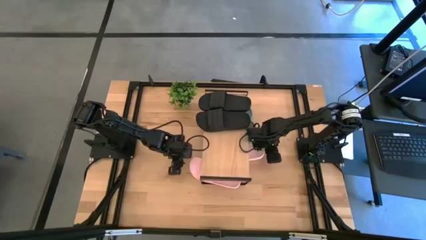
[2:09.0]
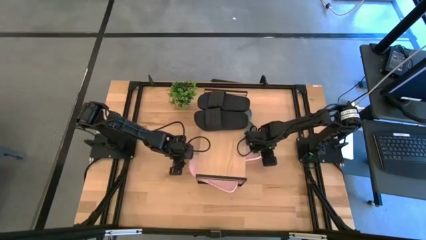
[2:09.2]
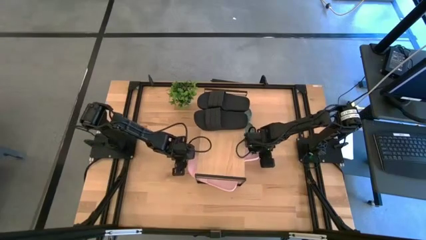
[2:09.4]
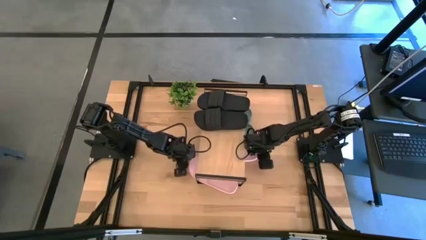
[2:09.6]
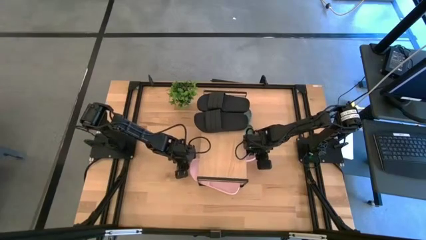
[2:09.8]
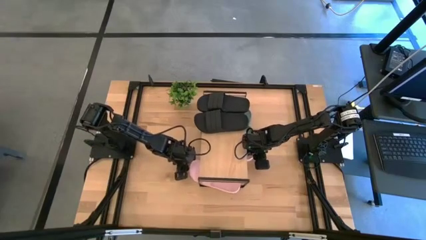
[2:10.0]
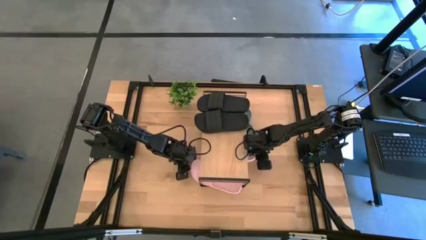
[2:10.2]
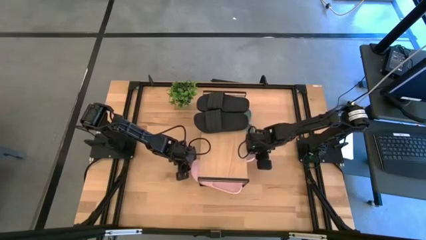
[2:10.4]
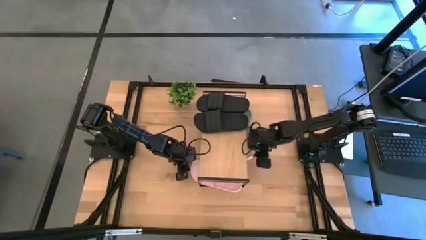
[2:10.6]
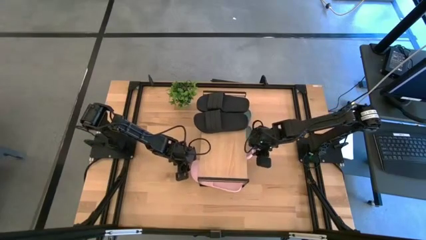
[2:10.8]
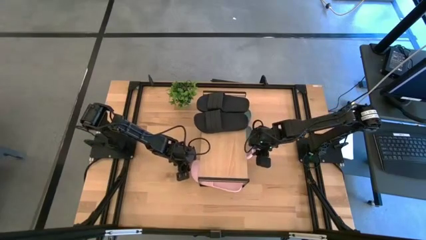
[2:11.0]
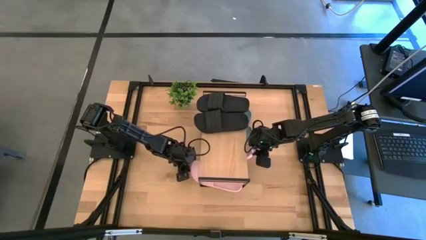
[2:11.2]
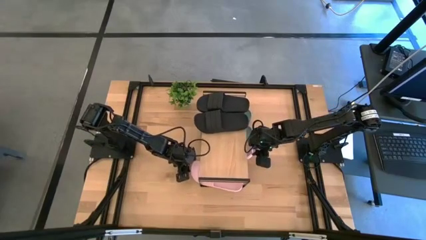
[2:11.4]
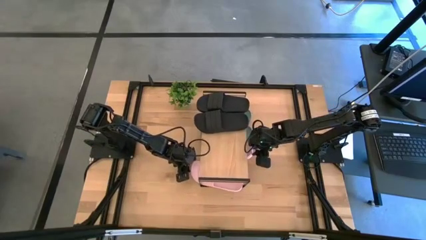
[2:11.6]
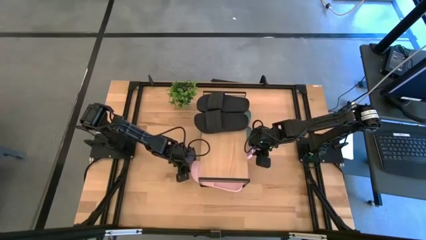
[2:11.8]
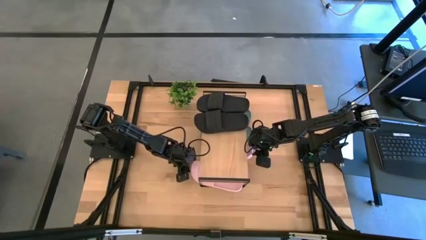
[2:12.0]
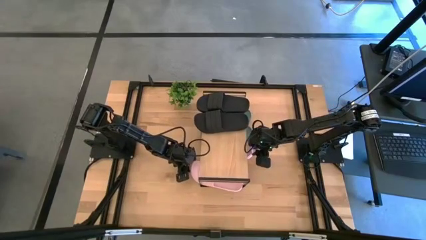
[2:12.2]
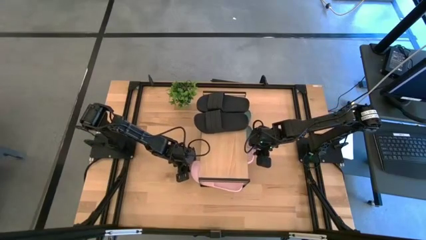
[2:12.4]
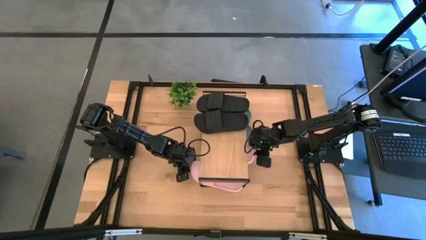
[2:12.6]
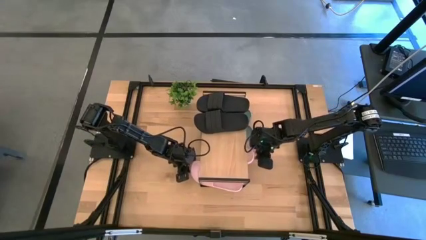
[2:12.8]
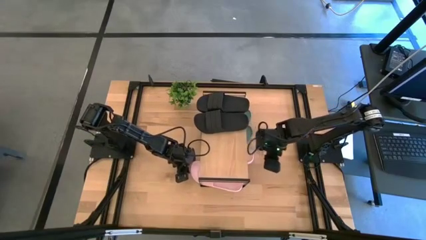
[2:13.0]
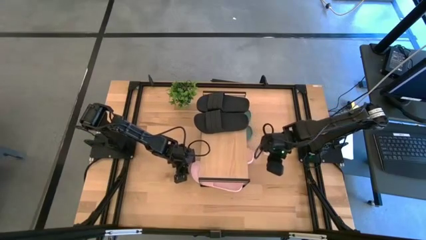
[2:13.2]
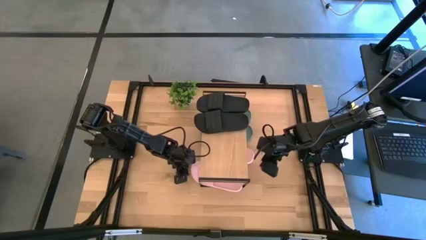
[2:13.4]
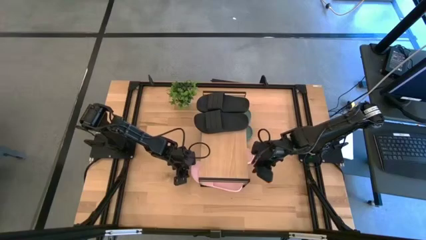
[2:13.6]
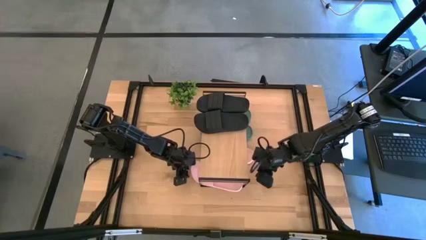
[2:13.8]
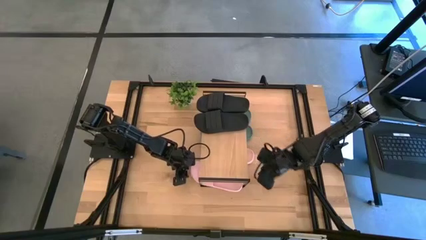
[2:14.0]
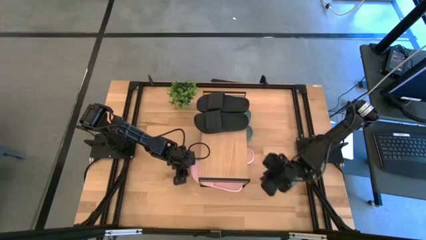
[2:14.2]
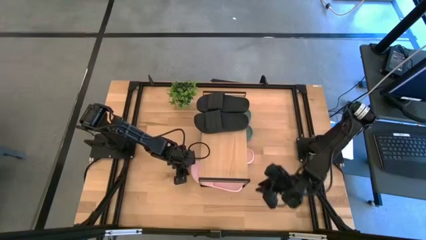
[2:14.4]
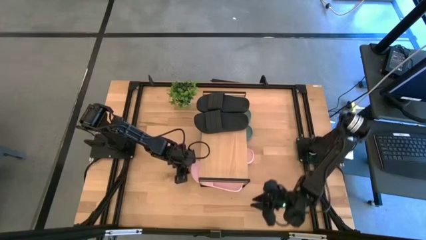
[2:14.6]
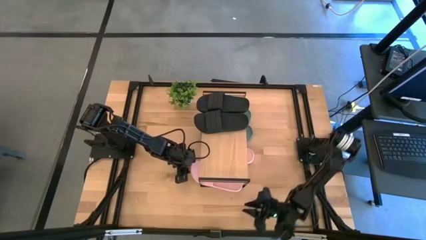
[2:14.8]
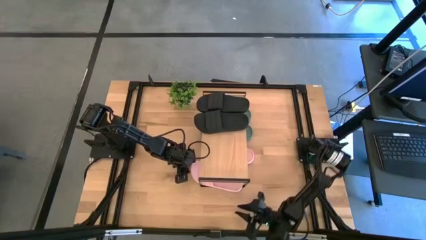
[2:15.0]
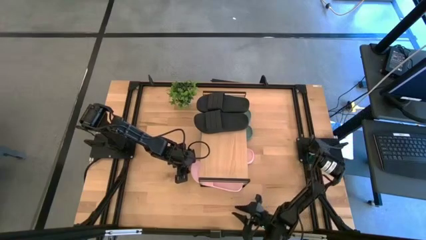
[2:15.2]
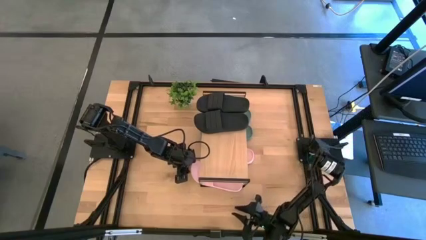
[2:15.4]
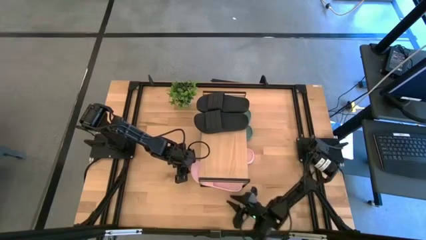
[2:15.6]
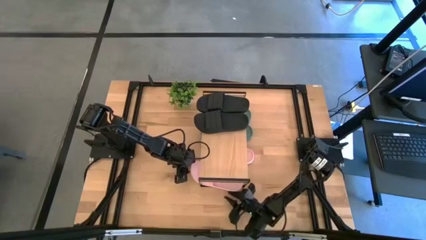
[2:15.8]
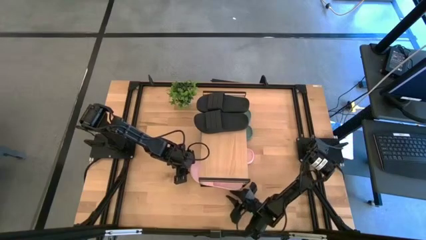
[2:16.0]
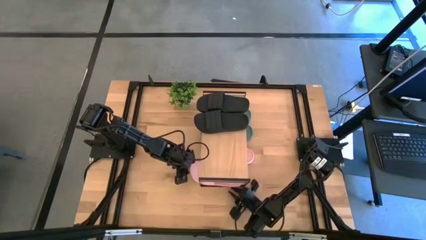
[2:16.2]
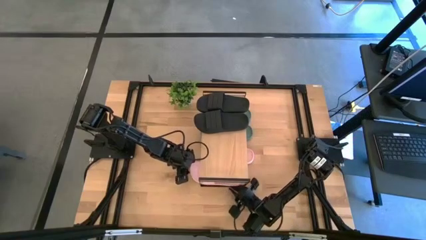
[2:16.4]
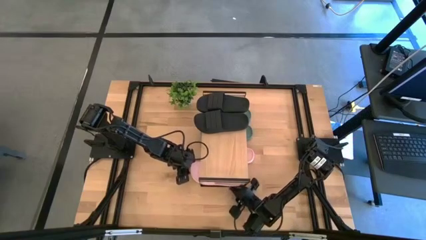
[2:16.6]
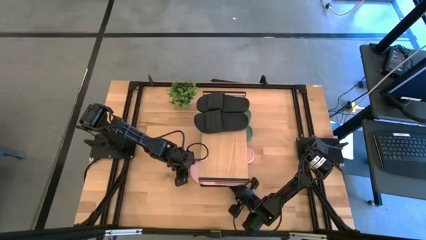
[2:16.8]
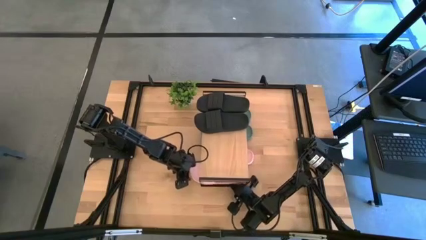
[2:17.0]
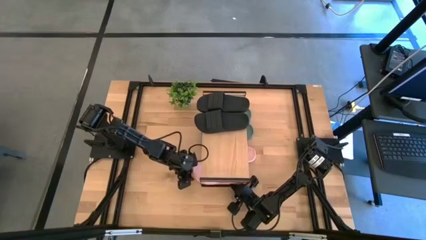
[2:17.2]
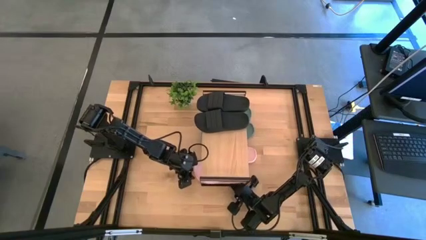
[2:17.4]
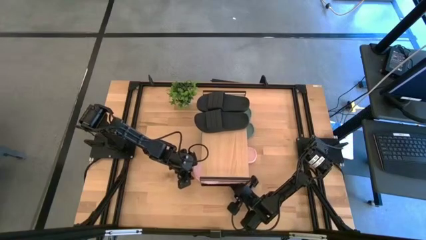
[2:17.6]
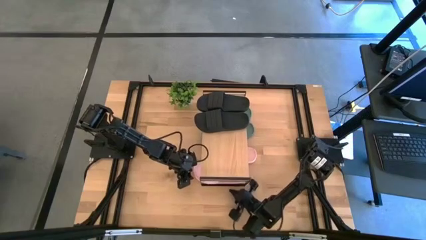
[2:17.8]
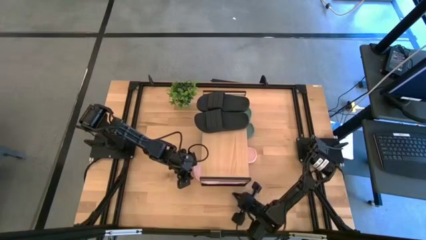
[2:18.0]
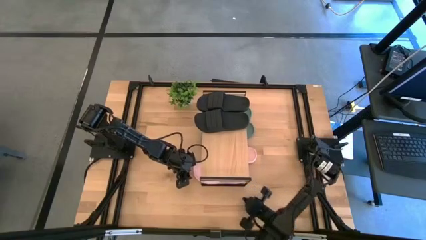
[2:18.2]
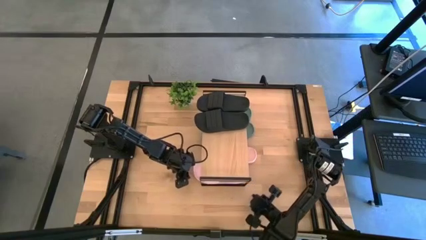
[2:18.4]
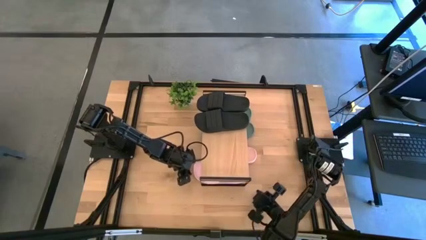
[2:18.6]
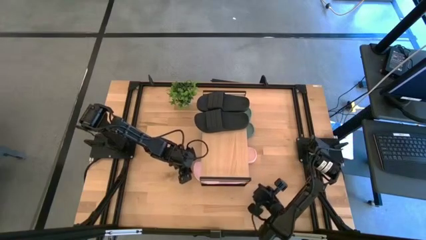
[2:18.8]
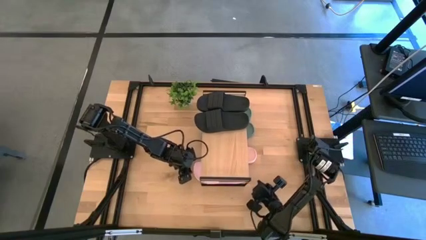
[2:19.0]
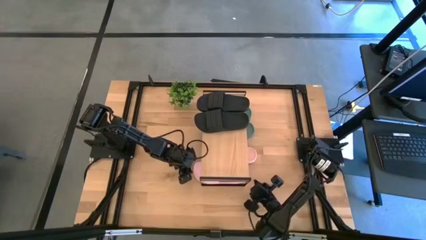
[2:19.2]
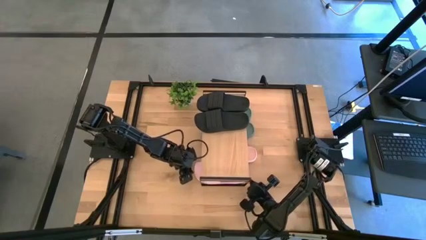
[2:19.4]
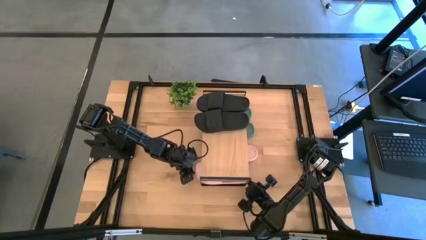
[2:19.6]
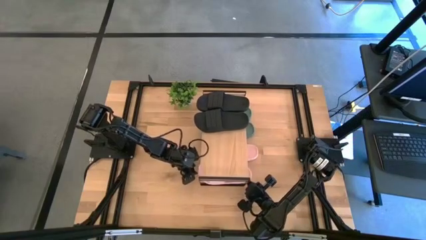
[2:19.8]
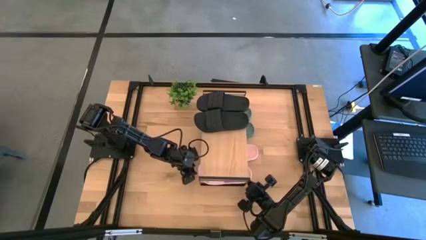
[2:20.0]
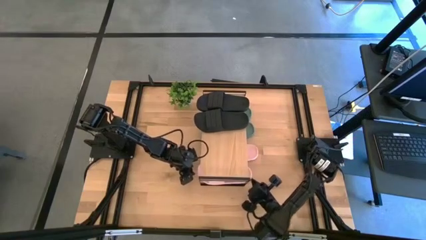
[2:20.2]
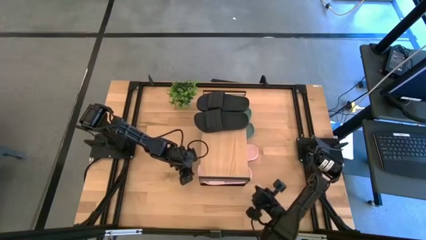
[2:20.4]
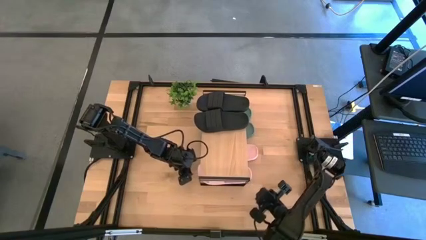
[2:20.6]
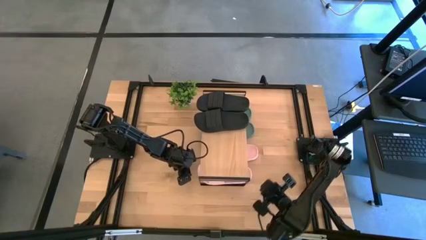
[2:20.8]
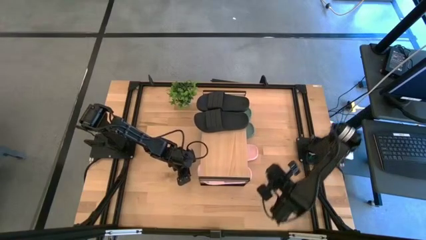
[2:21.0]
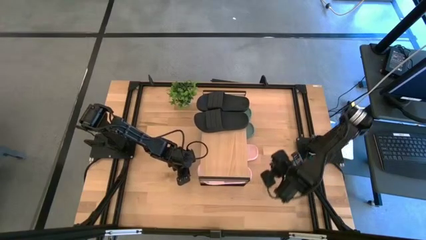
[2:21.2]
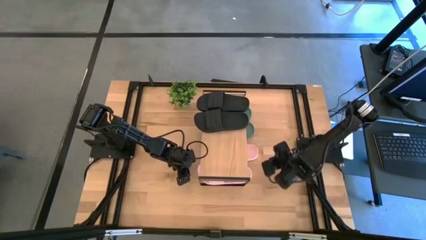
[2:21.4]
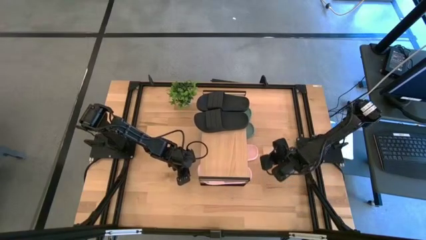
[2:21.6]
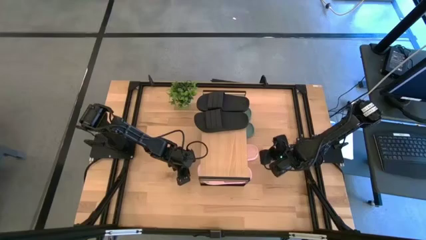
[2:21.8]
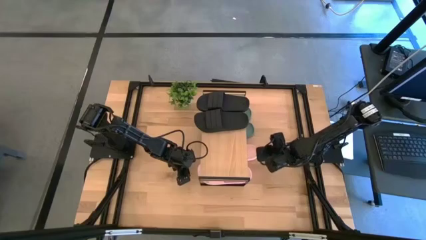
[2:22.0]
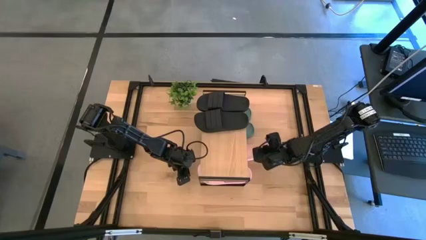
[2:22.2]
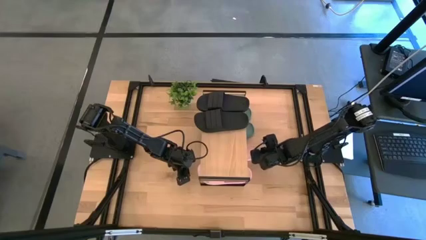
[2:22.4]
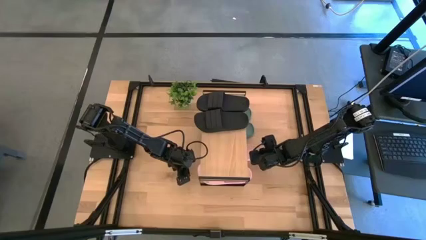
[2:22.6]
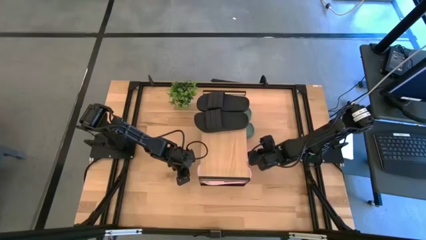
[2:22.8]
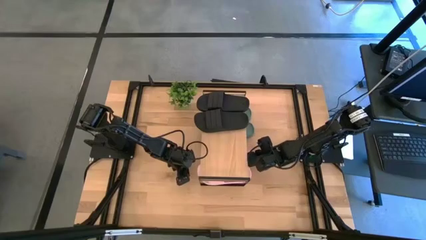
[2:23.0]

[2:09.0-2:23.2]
Task: Pick and place slides into the shelf
Adjust the pink slides under the shelf

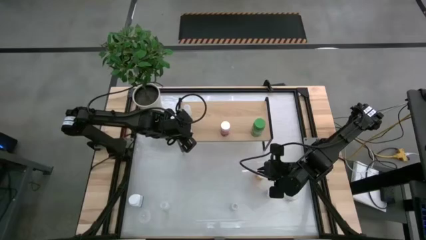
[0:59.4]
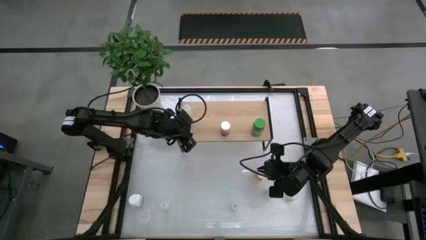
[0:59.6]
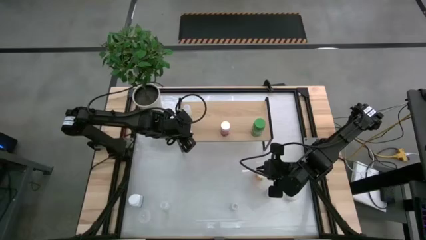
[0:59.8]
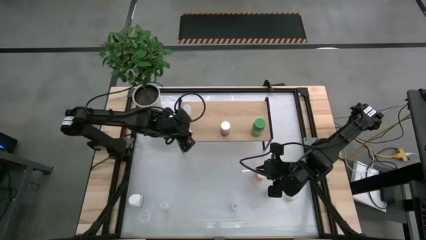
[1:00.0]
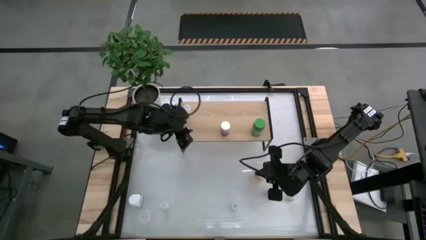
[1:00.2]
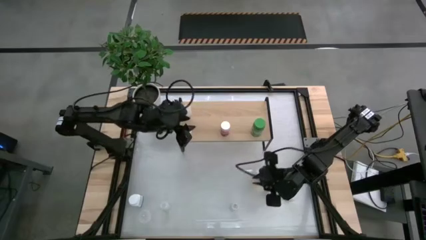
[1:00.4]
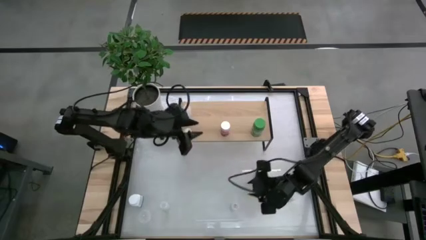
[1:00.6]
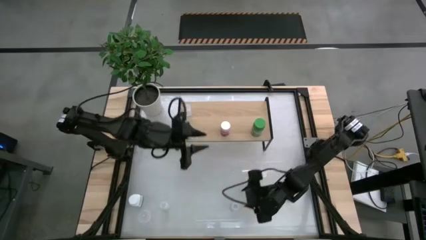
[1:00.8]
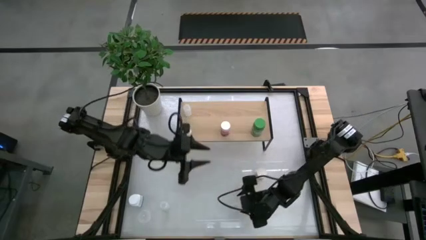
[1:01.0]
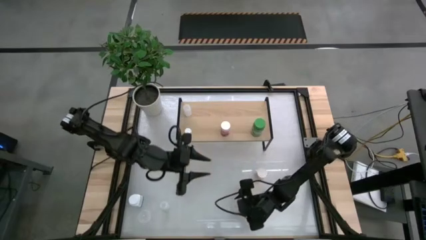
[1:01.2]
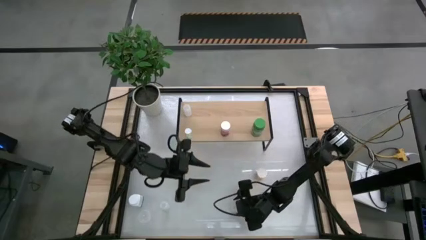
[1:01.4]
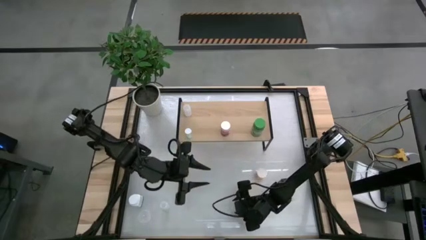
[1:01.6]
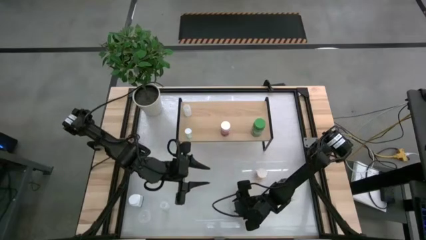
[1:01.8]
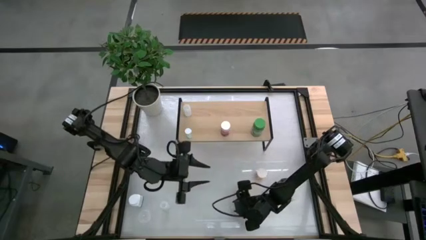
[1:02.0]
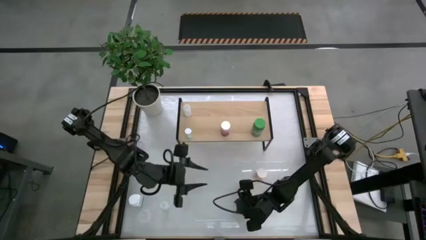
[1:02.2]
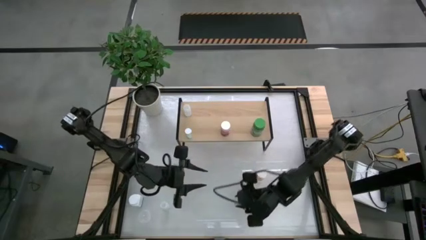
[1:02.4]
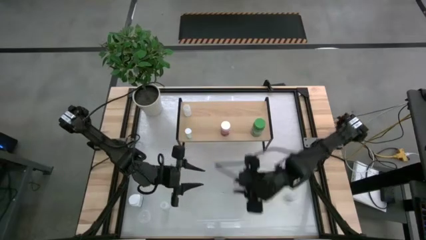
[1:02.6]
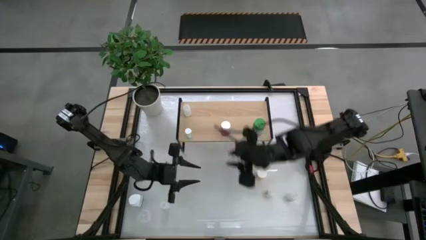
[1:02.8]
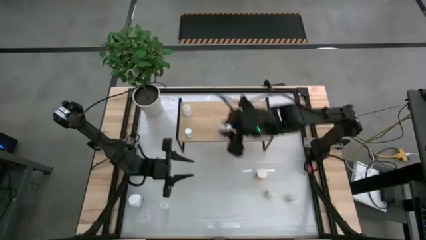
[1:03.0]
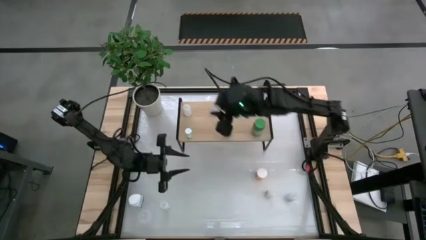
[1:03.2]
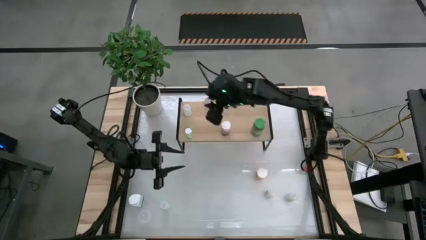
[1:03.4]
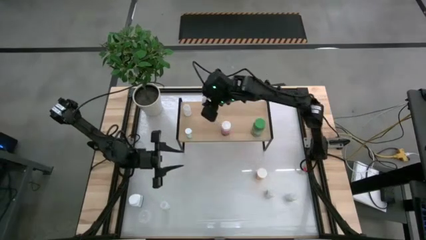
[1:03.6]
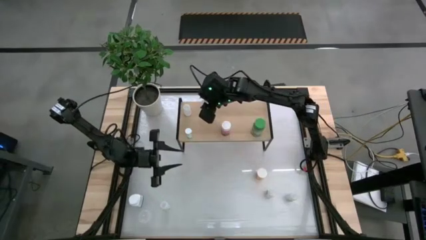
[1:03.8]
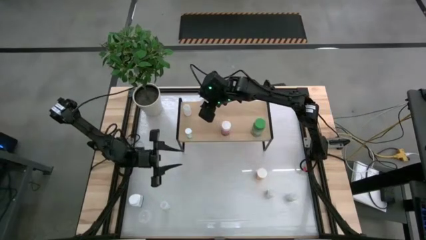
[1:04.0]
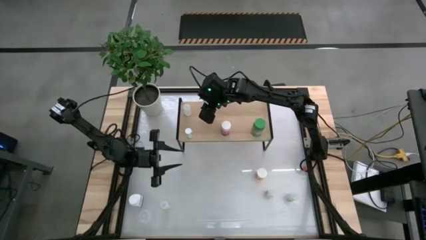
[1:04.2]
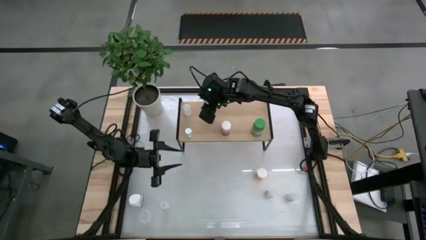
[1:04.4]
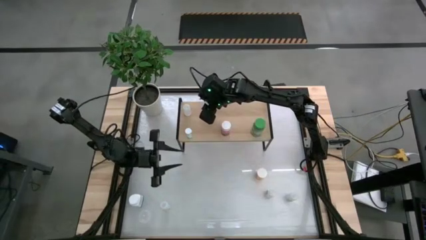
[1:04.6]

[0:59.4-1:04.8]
Task: Pick and place medicine bottles onto shelf by color
Put the transparent pill bottle on the shelf
